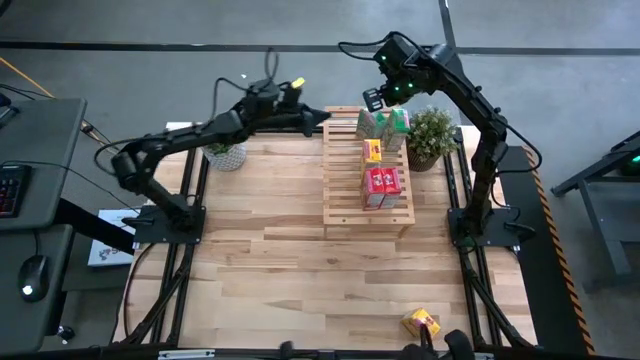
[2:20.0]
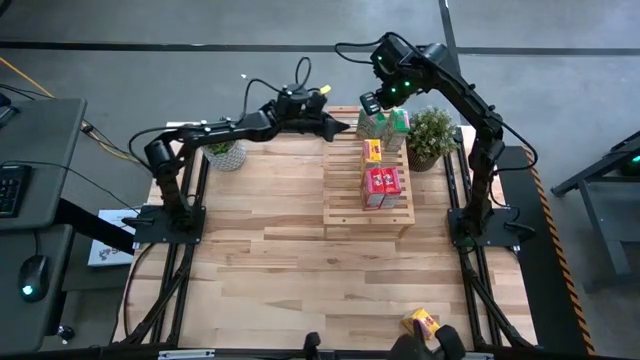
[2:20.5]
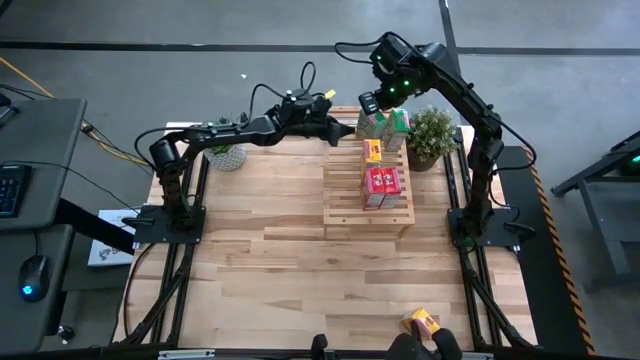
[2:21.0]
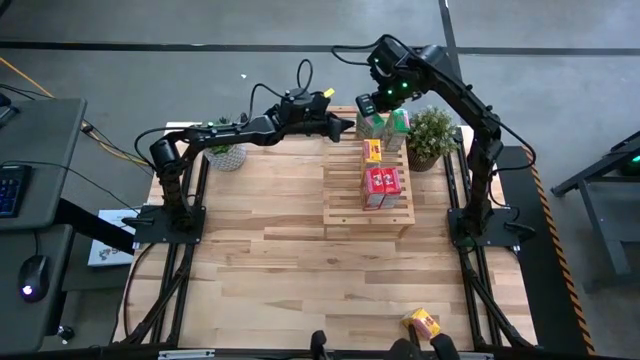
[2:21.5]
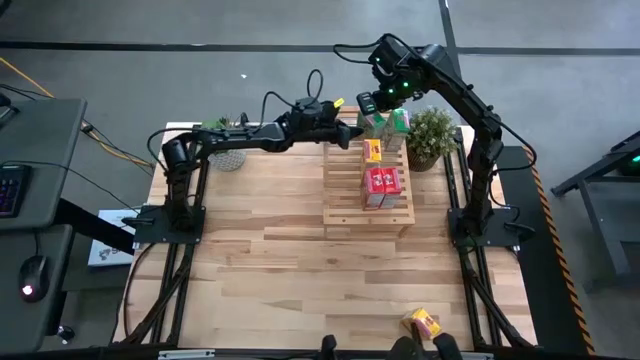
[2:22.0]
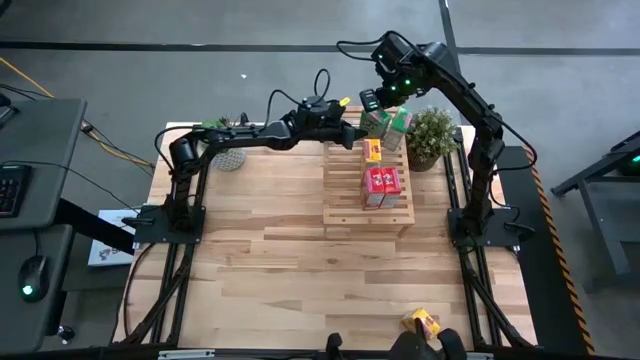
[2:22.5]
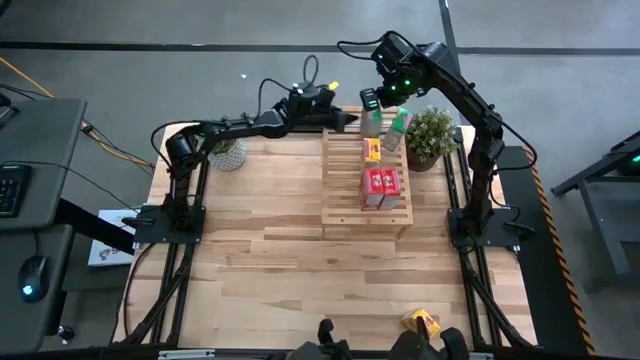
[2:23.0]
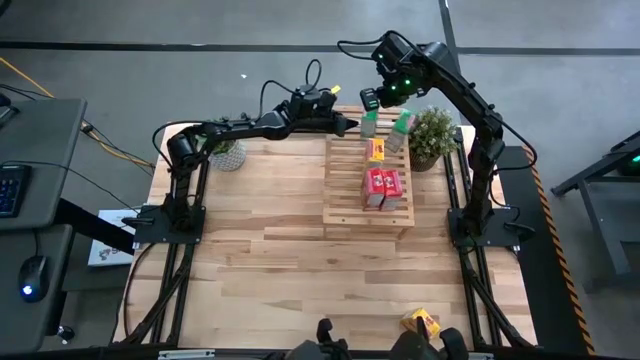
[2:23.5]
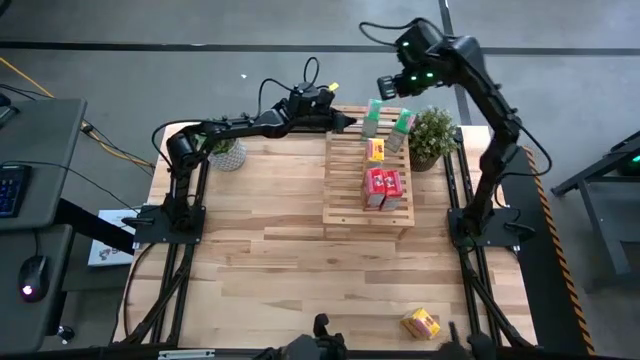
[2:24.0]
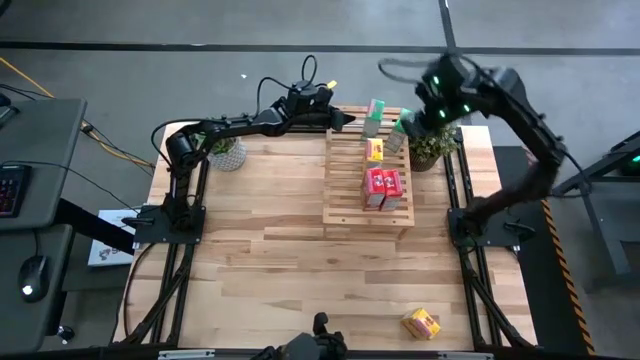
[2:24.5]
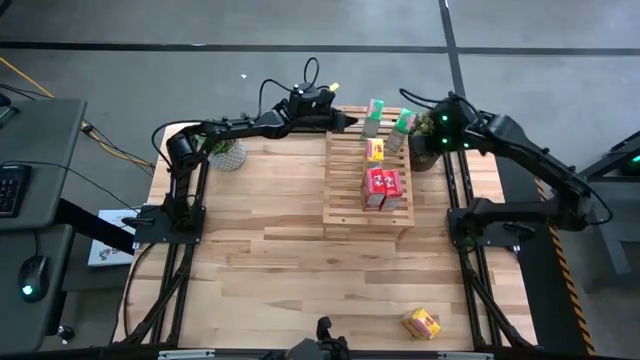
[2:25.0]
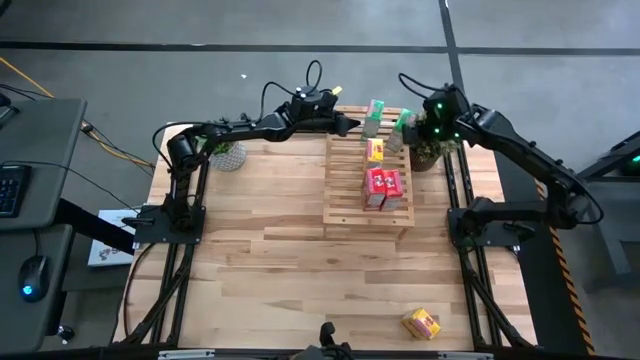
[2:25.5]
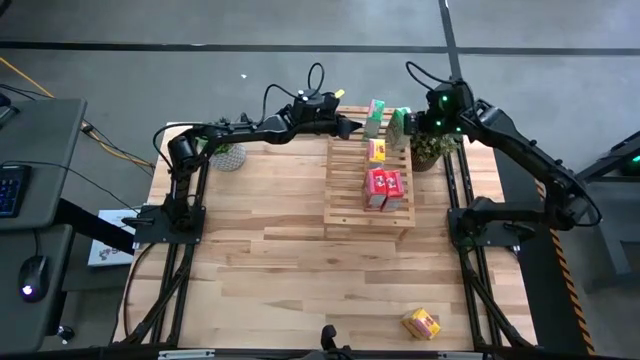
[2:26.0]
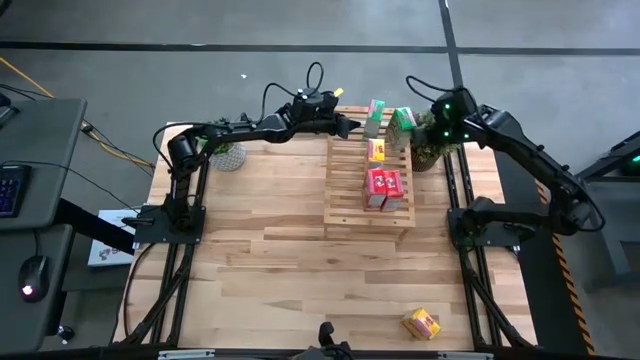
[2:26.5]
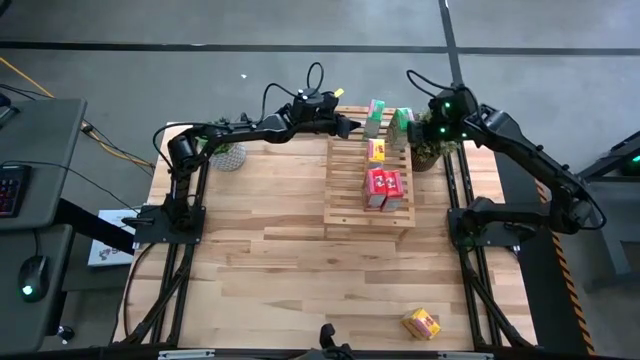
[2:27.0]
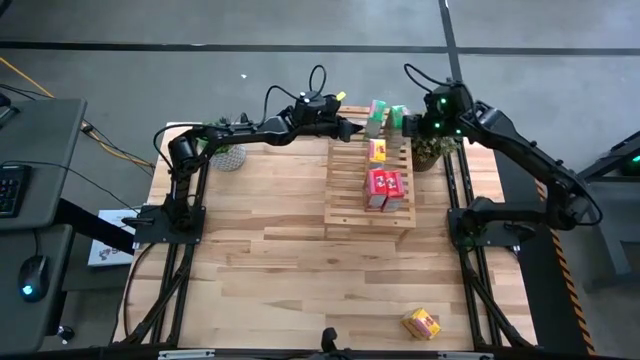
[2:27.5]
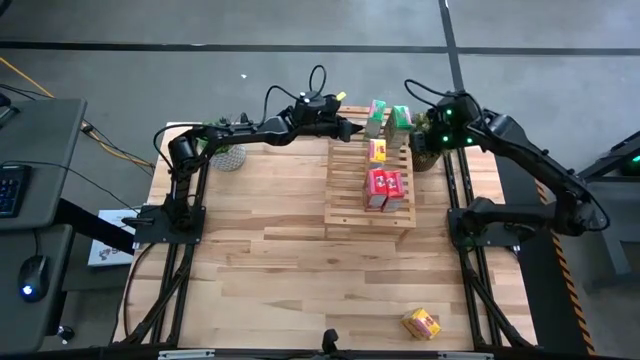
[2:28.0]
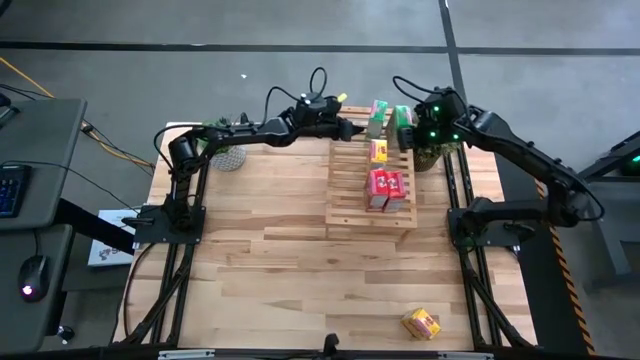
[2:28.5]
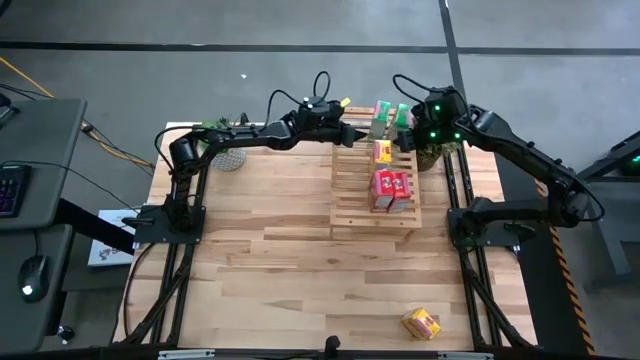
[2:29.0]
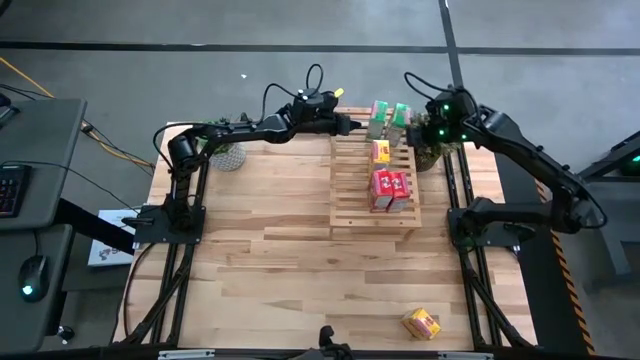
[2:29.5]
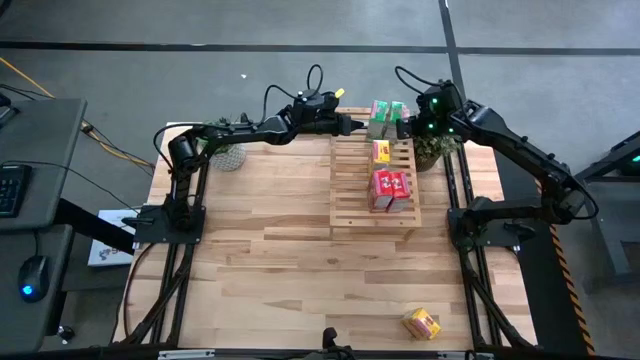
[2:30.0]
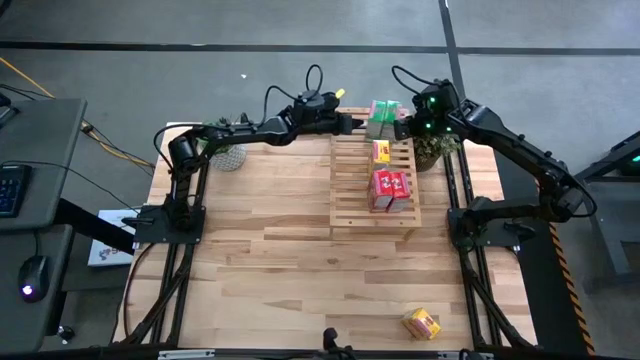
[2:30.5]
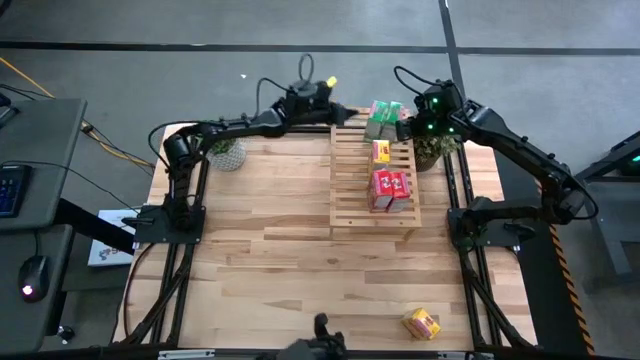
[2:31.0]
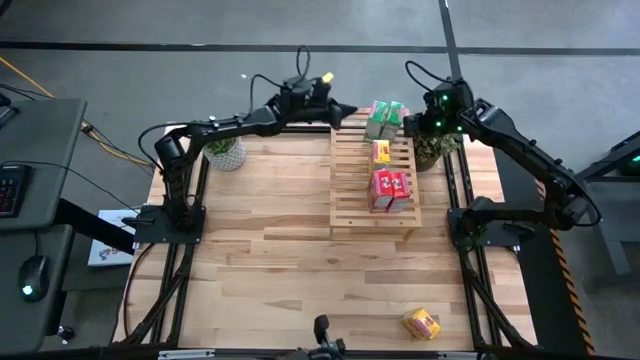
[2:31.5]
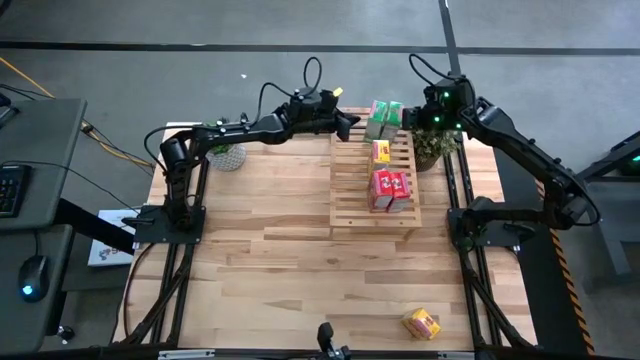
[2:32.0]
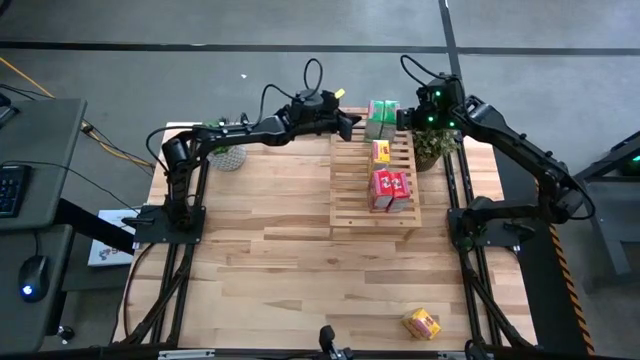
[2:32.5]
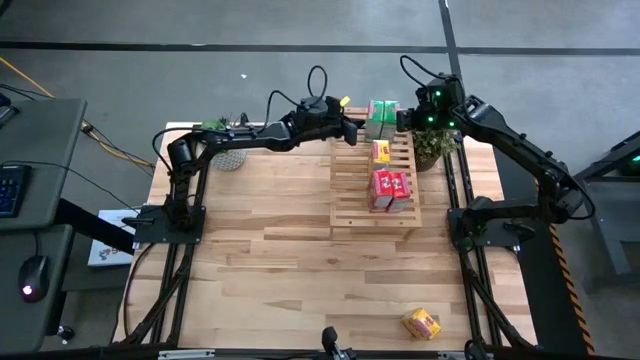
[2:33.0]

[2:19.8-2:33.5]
Task: Stack cereal on shelf
Put the green cereal on the shelf

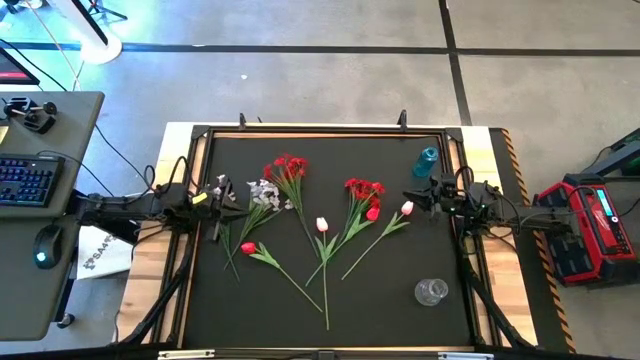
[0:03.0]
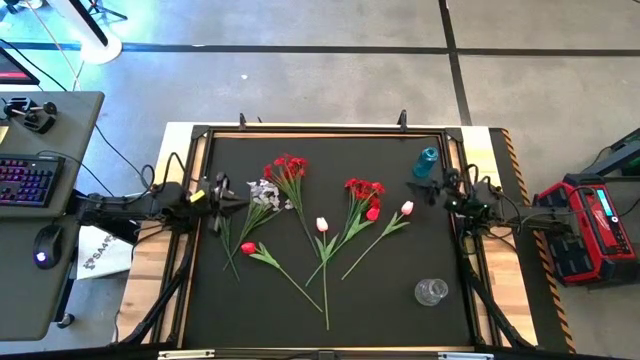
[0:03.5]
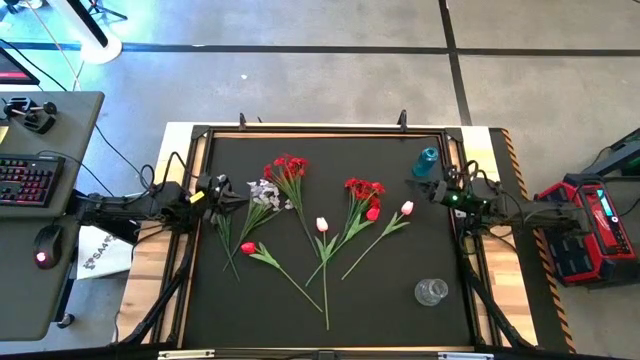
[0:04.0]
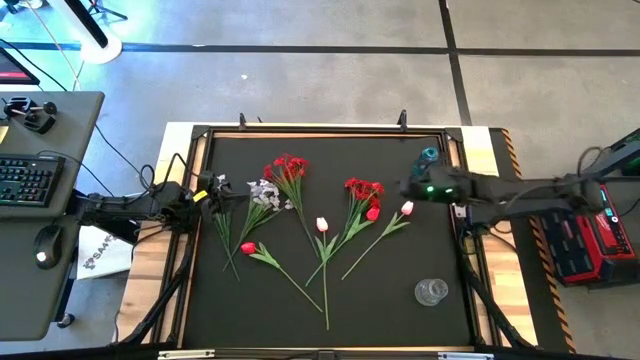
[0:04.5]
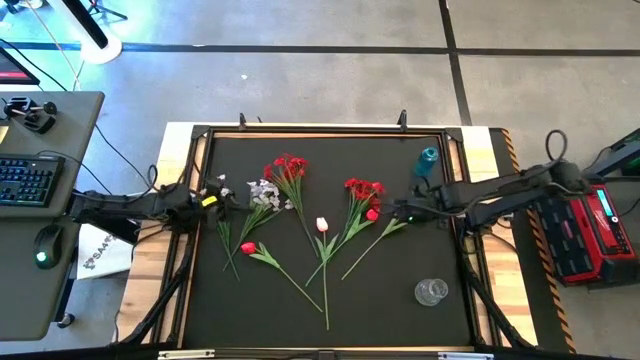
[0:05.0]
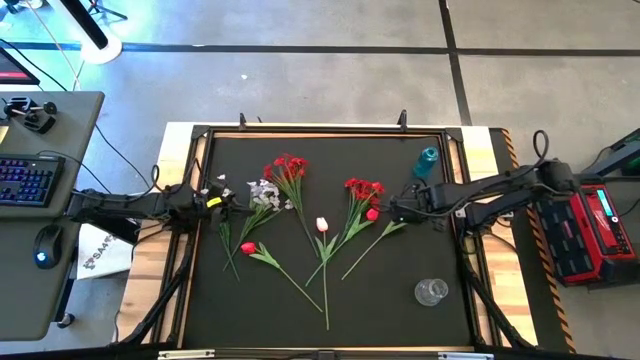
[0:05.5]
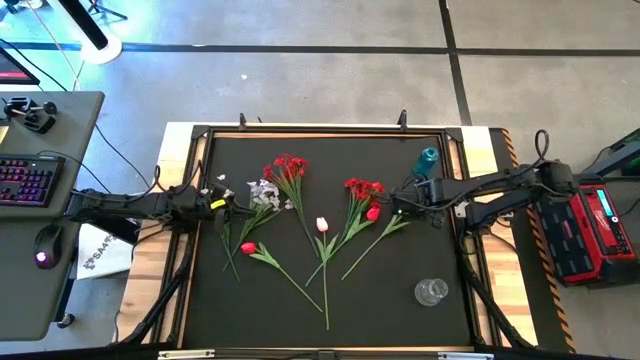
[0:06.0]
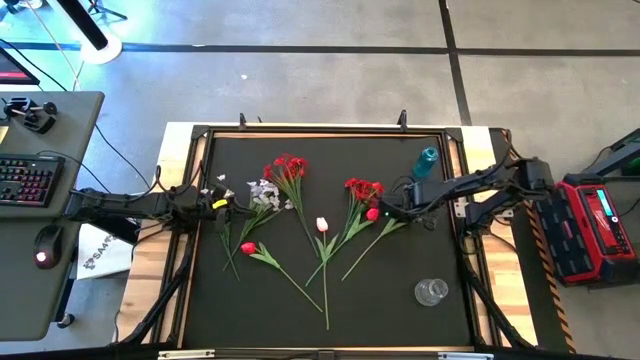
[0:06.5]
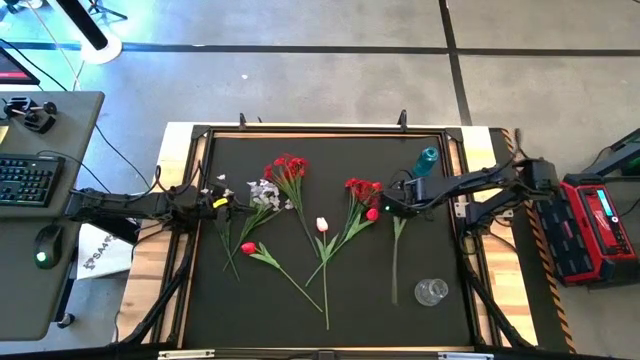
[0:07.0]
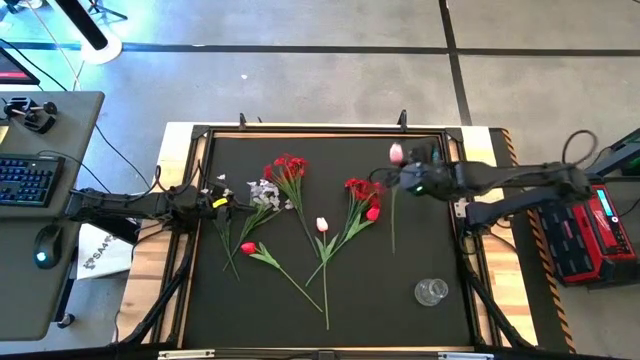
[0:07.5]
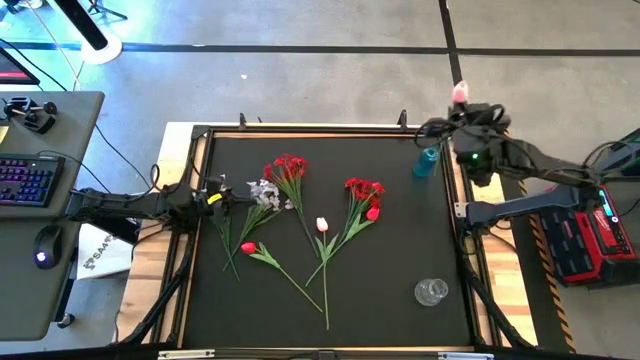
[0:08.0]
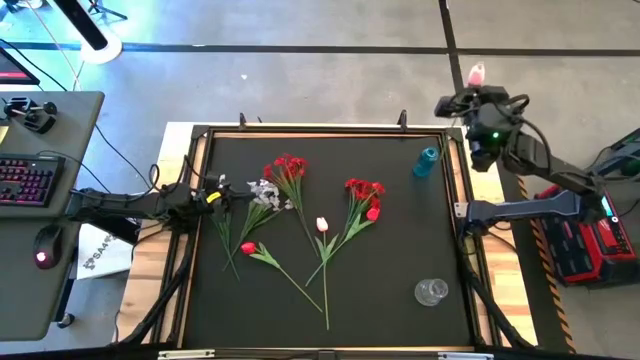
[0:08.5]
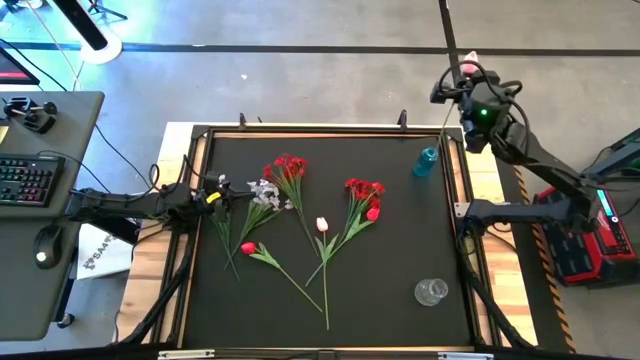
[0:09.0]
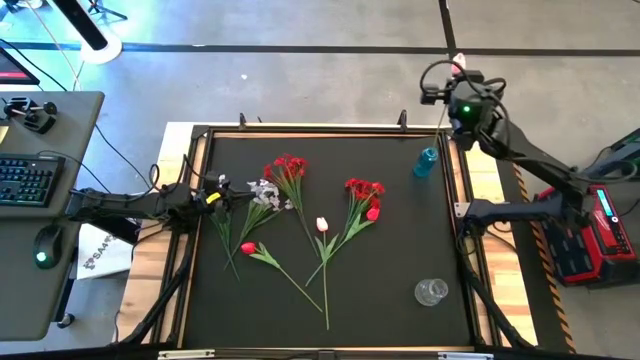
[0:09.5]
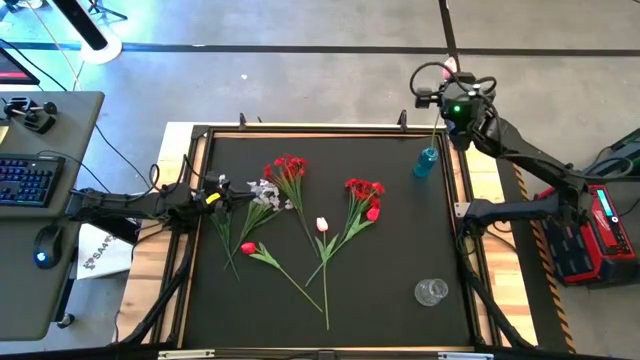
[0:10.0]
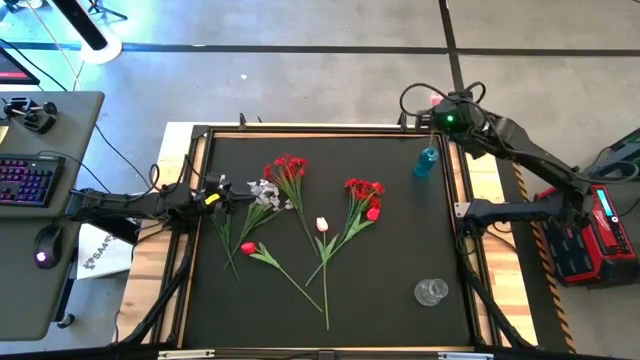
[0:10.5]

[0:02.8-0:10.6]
Task: Sort flowers into vase by color
Put the right pink flower into the blue vase
